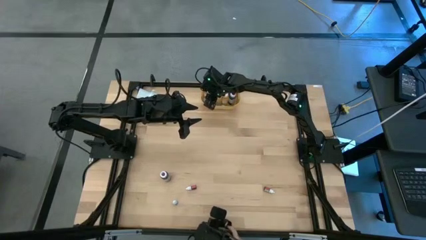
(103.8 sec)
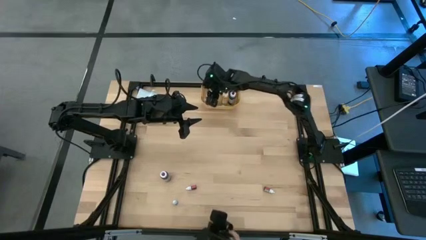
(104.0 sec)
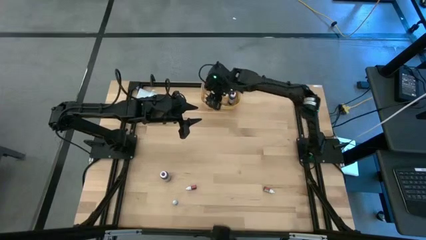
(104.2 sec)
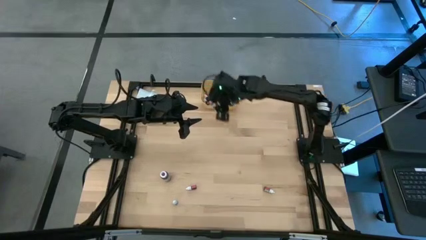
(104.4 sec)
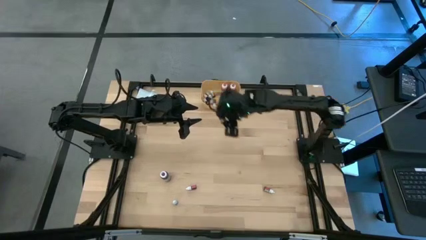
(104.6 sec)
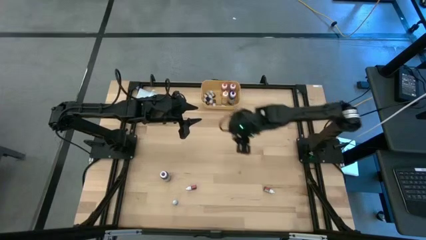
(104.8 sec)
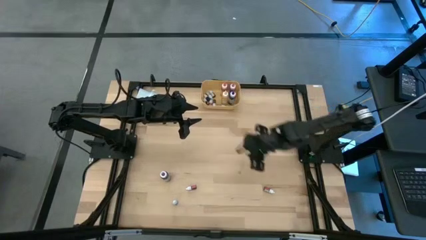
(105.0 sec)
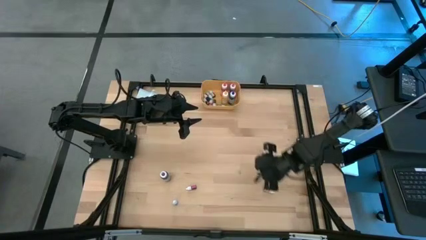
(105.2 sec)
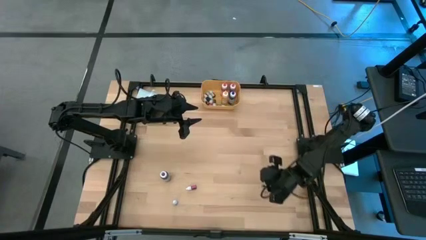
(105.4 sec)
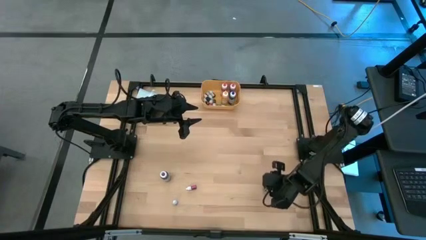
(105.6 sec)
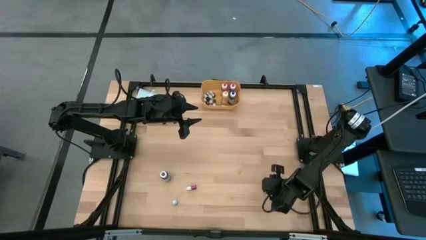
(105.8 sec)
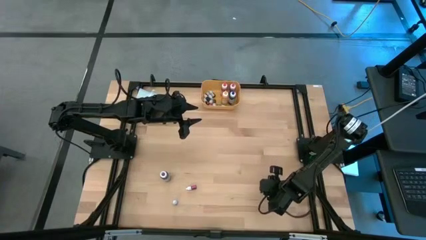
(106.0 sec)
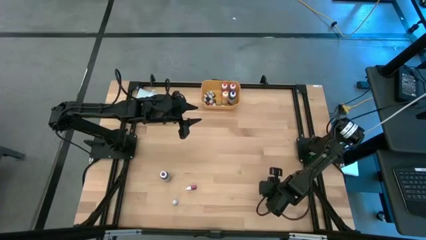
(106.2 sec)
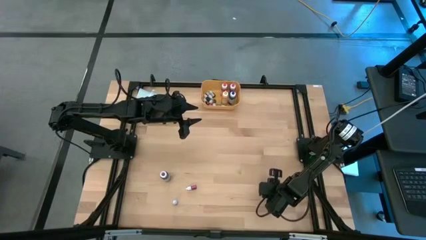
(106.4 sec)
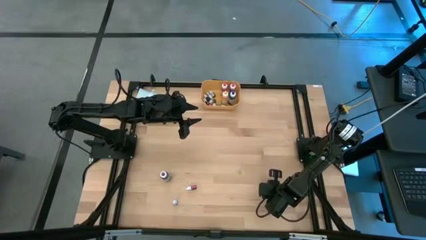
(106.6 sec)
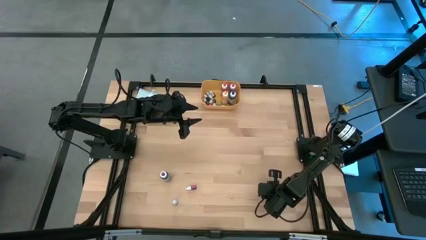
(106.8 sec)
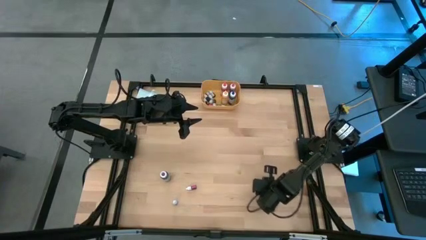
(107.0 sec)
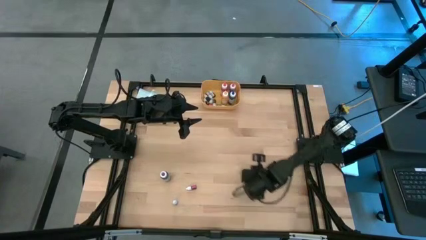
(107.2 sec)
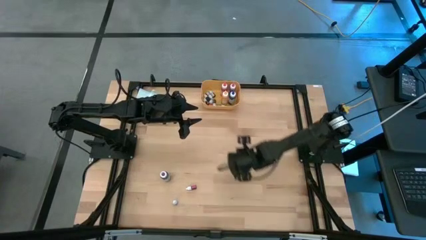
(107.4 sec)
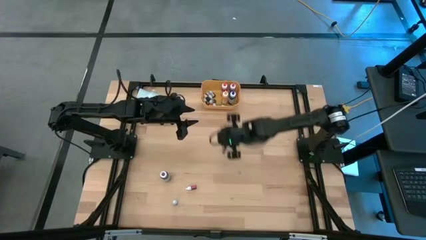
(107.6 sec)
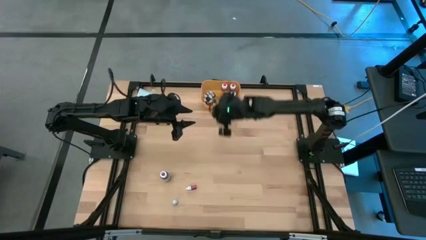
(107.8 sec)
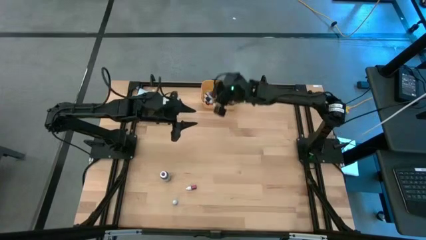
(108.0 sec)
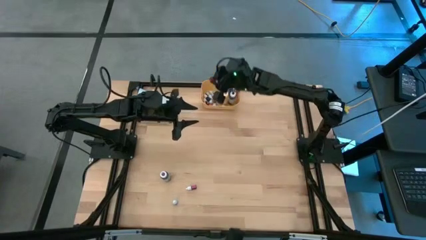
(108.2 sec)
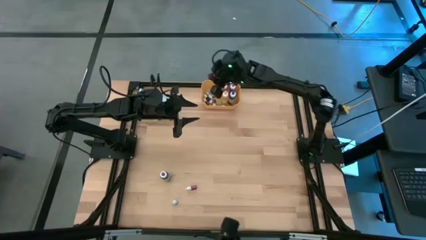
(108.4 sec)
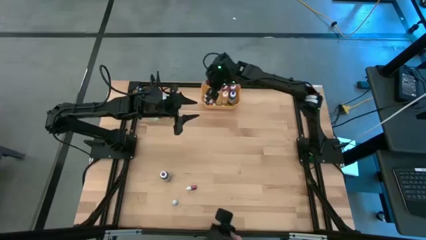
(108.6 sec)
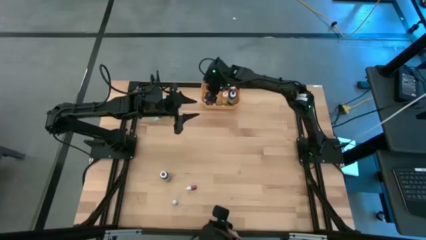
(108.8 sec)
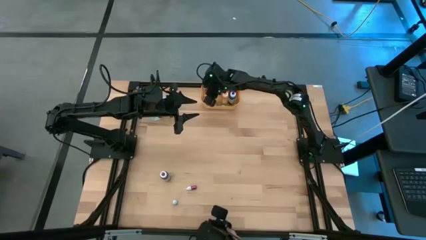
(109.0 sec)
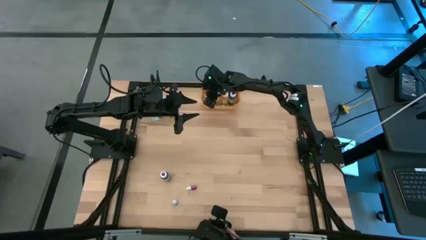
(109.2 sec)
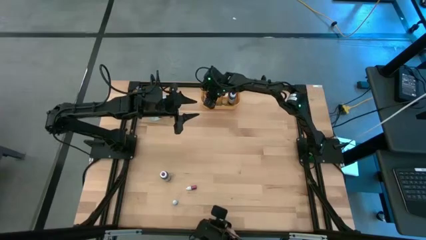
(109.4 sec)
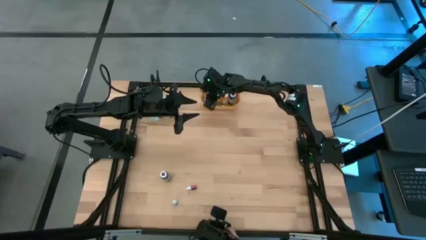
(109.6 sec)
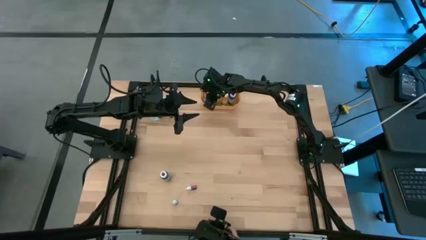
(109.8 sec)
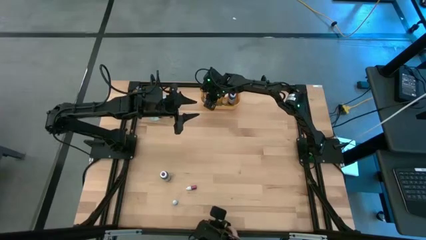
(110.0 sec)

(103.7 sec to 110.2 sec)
Task: Pick & Place food coloring
Put the red food coloring bottle into the yellow bin

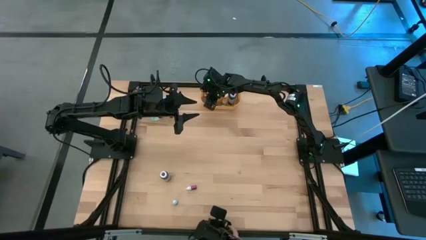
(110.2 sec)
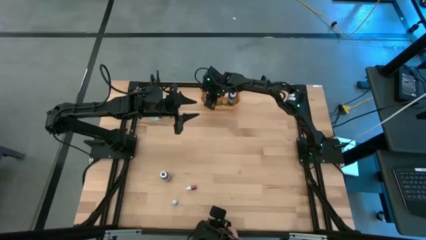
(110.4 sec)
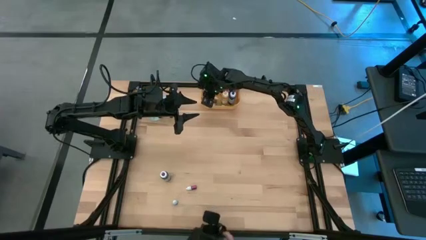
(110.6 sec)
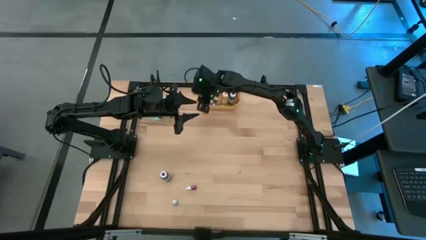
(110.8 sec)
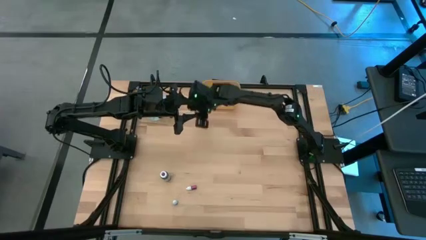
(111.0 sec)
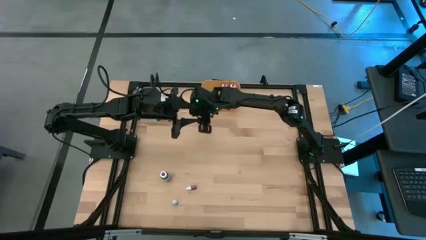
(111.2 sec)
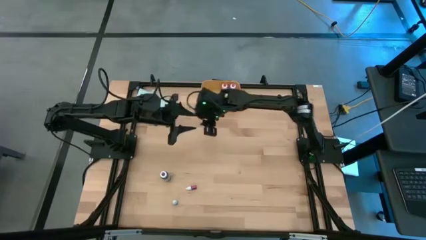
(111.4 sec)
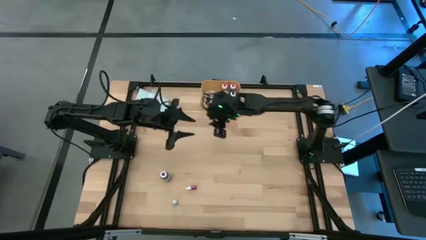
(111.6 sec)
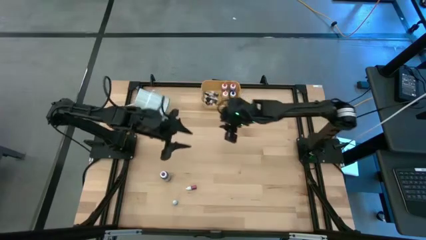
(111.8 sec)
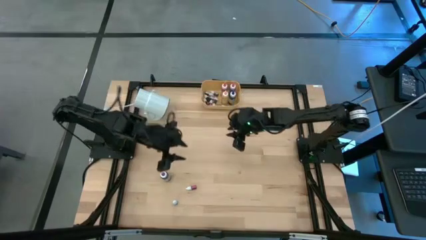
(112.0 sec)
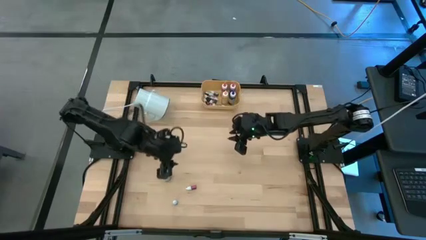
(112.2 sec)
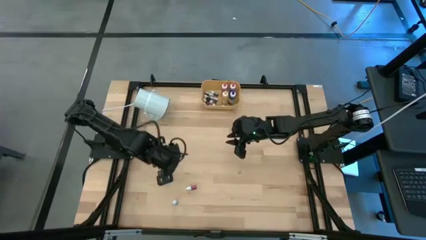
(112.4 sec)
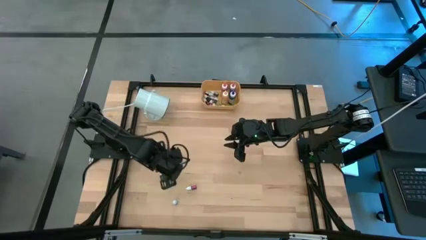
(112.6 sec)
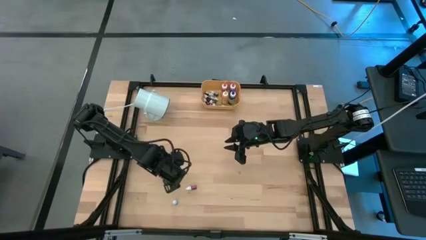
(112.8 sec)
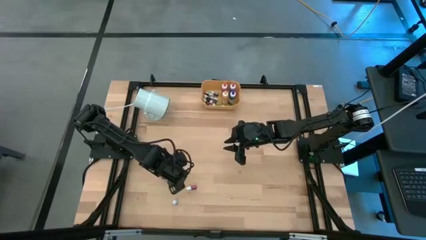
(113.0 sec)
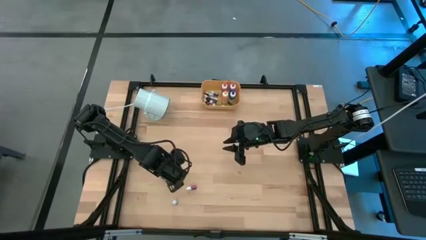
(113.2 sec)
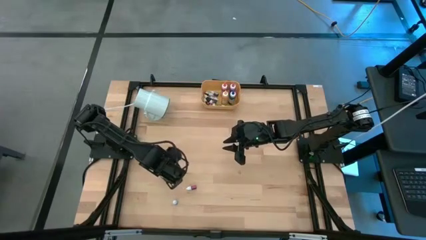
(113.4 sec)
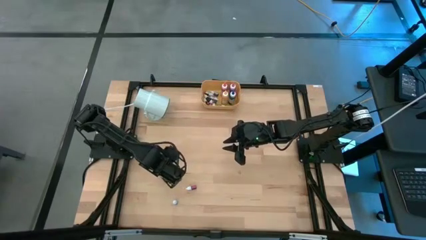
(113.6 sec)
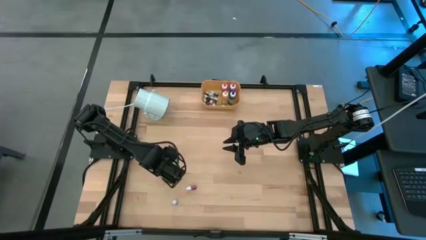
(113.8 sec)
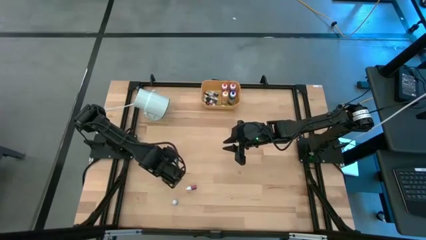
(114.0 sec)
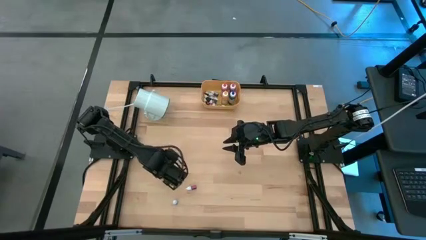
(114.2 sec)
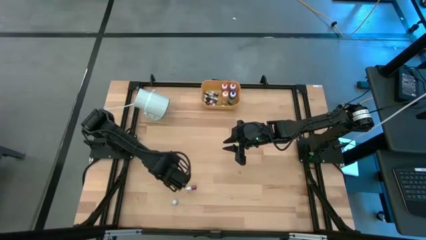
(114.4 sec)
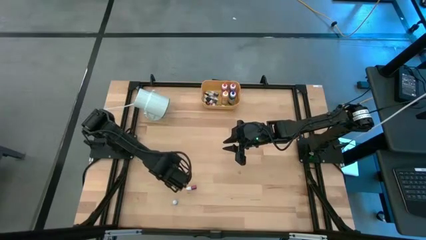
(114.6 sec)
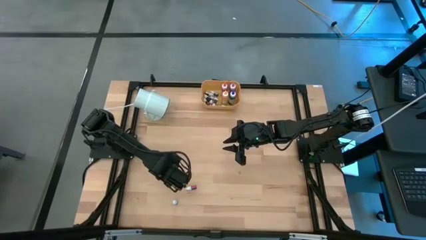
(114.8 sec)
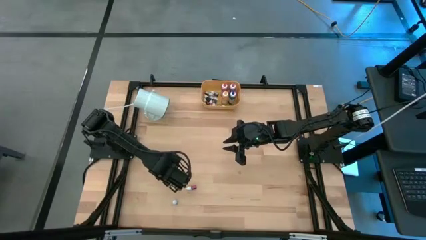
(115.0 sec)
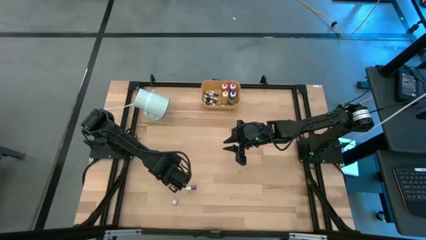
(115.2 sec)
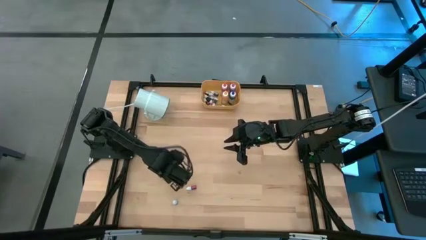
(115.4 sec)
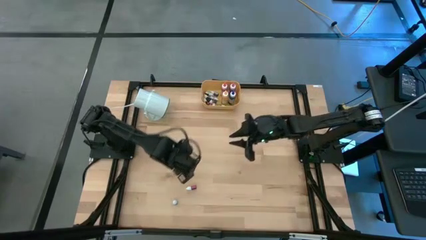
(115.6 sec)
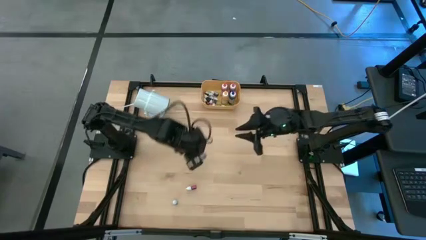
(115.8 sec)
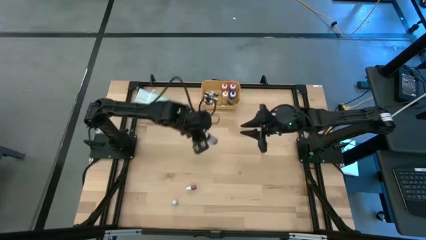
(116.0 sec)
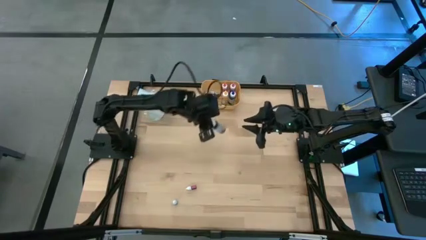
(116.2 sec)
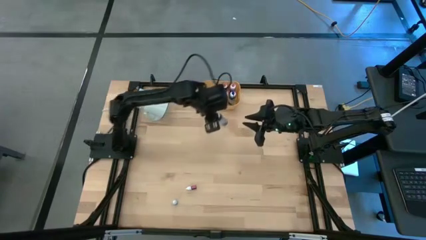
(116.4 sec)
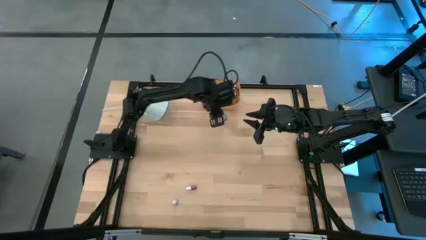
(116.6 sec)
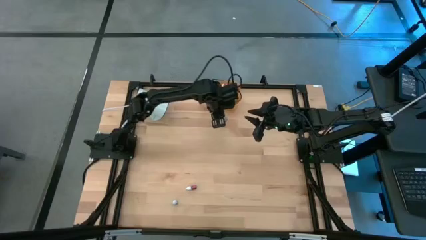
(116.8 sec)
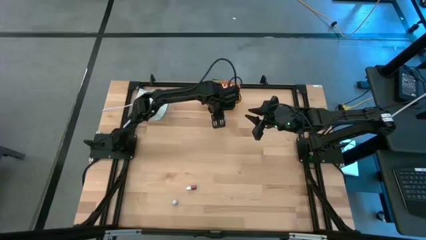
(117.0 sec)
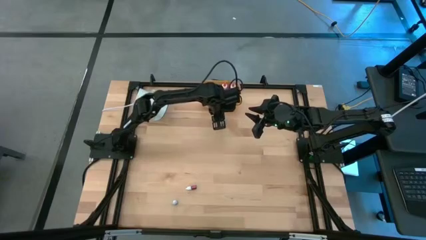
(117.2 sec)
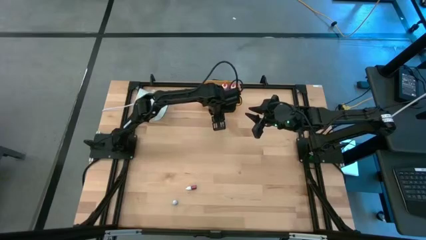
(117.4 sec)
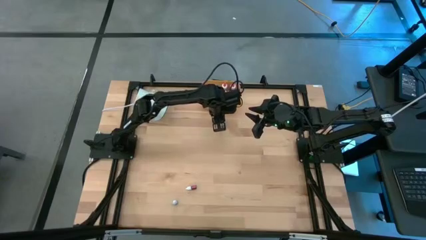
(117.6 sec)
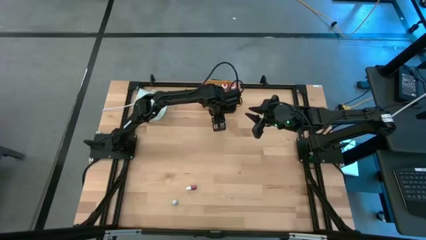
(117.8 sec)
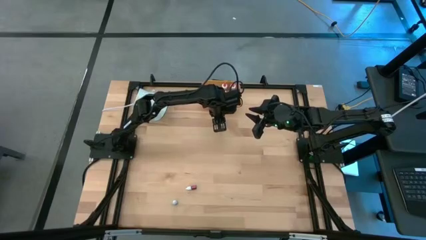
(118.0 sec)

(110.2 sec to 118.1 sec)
Move the violet food coloring bottle to the top center of the table

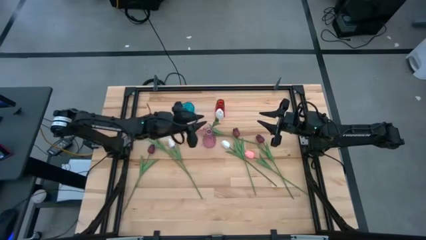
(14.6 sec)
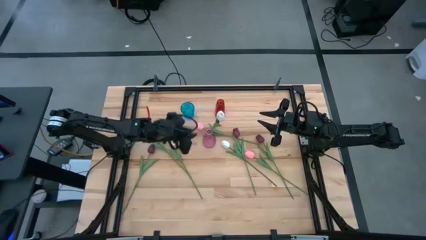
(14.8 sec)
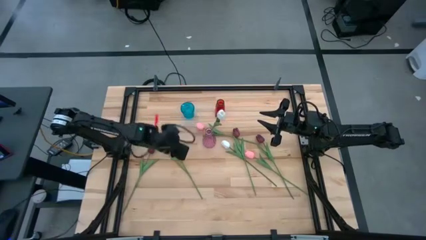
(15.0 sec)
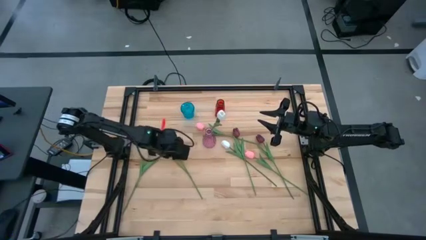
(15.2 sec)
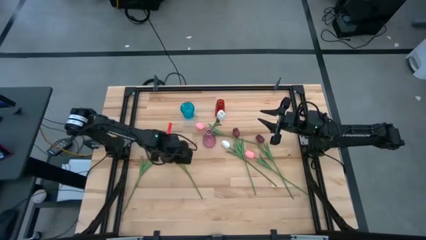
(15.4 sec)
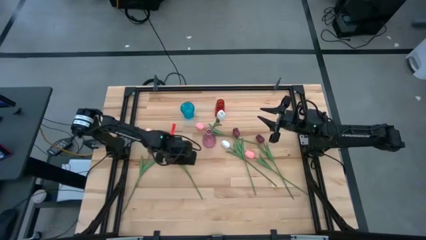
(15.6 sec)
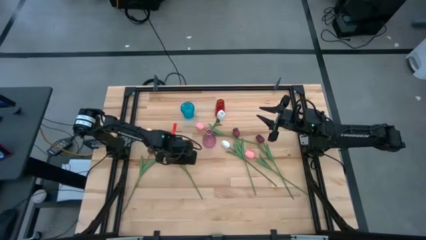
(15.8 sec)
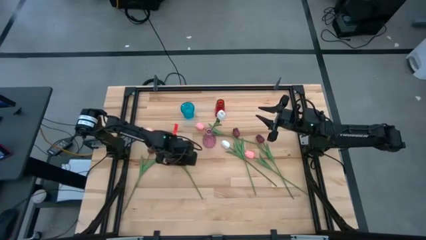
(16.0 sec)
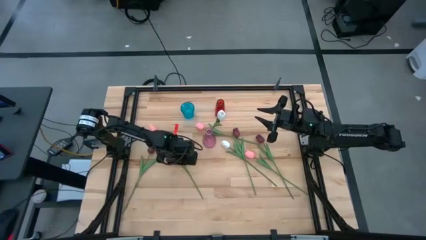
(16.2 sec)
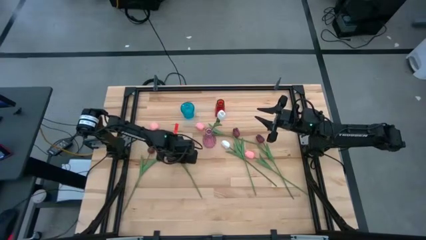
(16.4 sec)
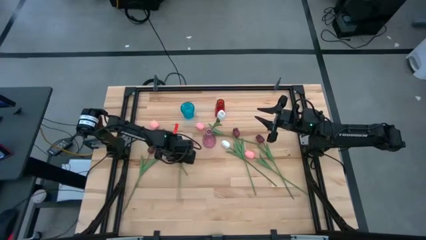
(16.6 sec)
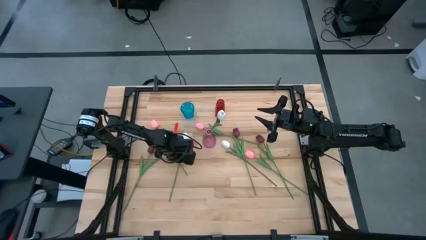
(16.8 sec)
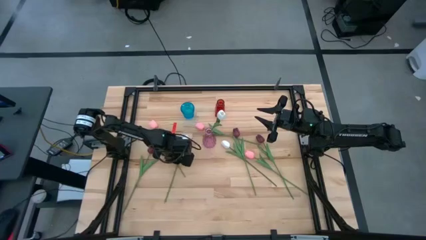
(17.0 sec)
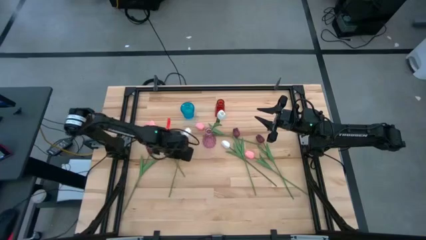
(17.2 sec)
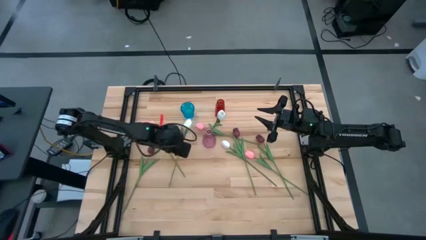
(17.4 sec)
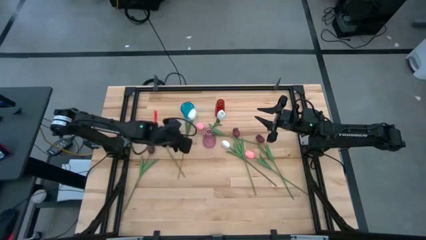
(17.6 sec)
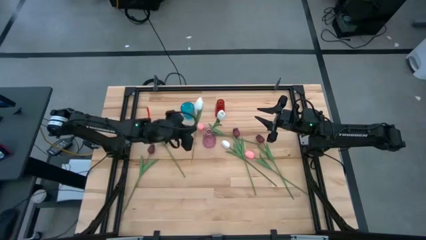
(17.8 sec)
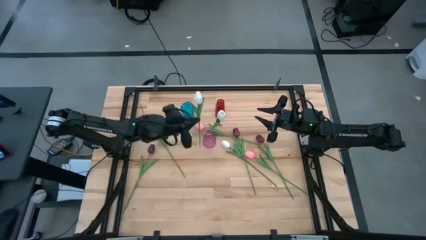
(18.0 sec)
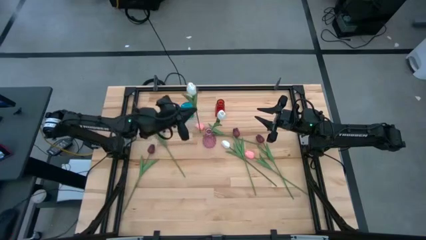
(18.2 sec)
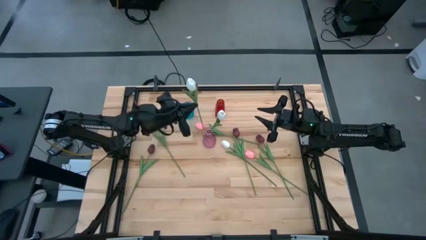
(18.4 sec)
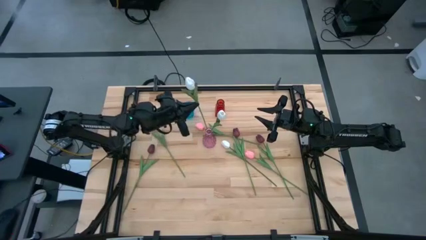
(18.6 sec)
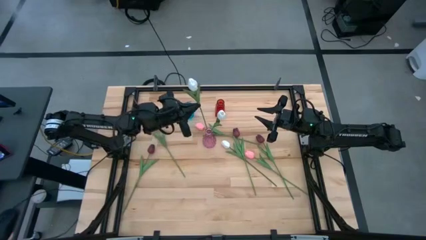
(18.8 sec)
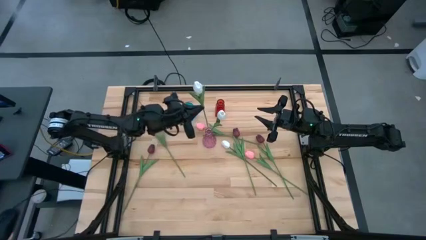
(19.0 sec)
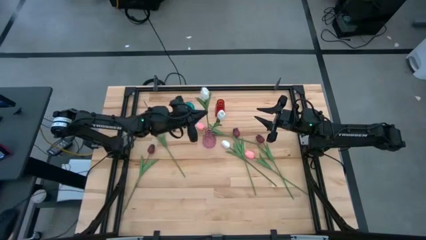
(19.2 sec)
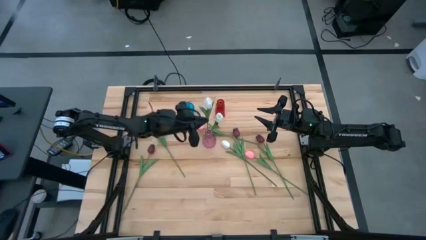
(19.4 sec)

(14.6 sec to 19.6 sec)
Task: Sort flowers into vase by color
Put the left white tulip into the pink vase
